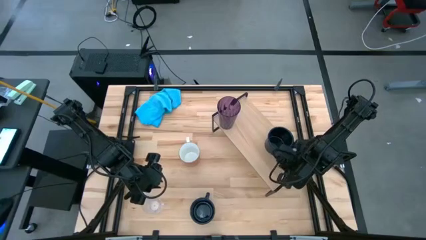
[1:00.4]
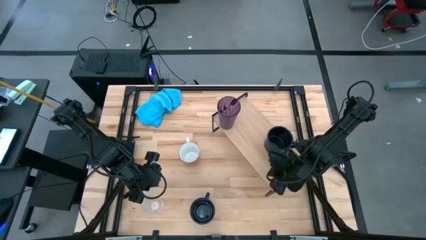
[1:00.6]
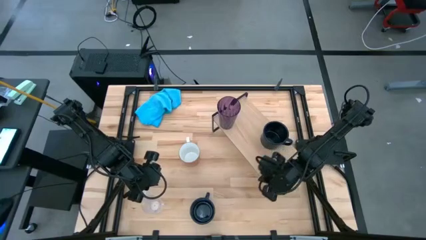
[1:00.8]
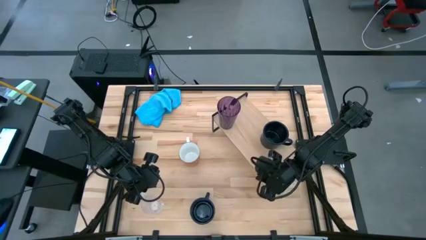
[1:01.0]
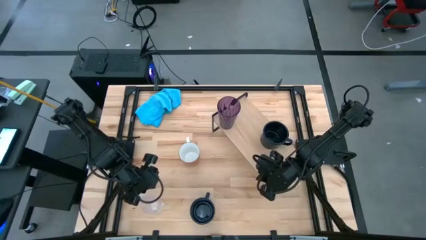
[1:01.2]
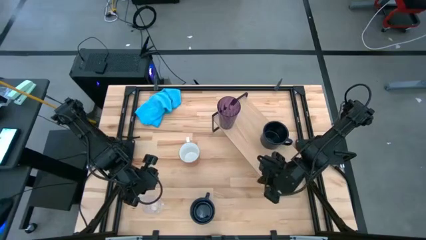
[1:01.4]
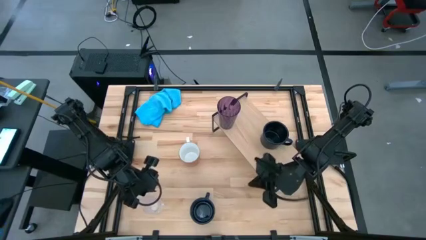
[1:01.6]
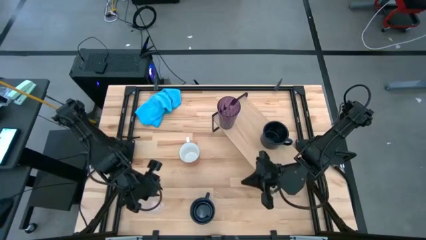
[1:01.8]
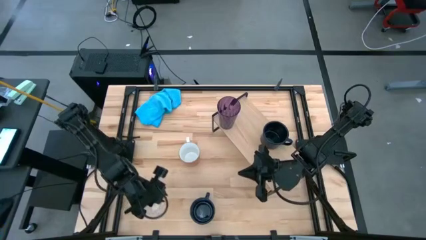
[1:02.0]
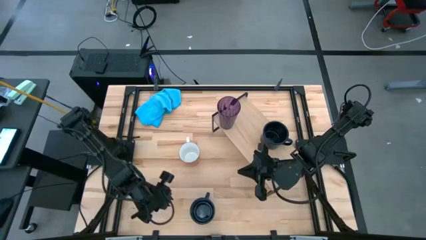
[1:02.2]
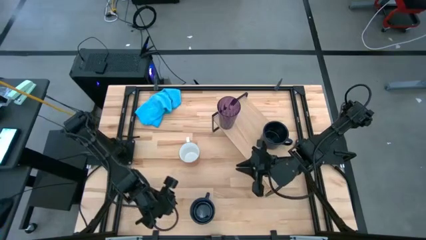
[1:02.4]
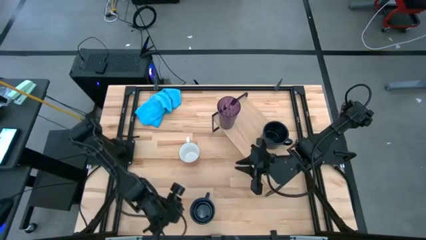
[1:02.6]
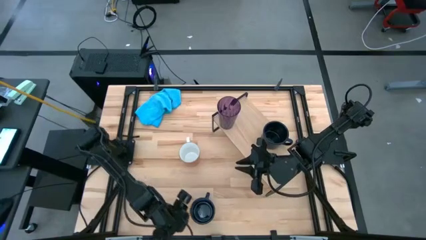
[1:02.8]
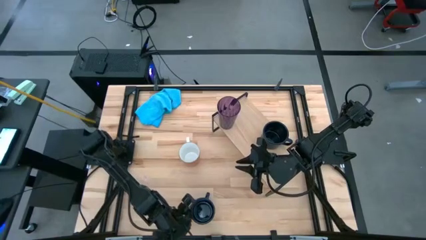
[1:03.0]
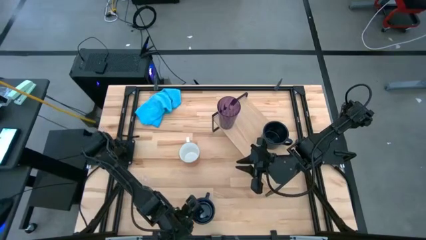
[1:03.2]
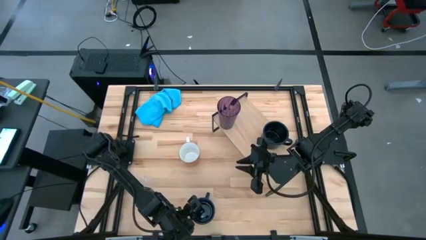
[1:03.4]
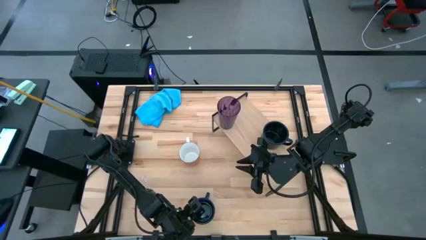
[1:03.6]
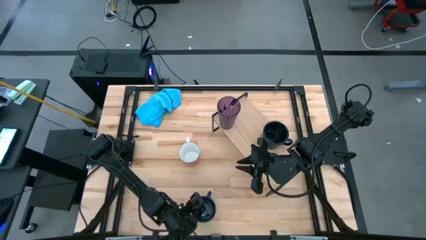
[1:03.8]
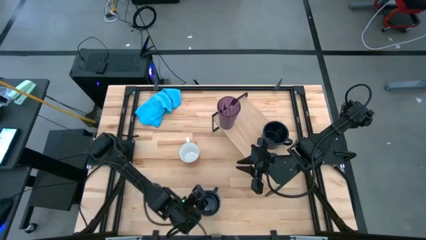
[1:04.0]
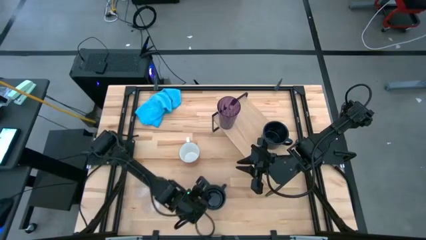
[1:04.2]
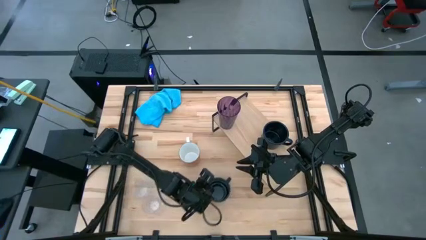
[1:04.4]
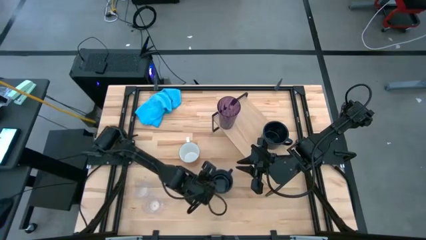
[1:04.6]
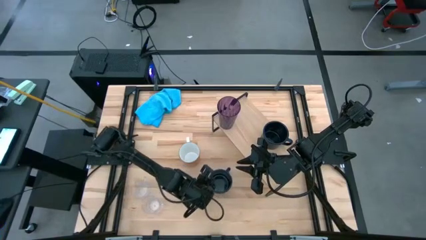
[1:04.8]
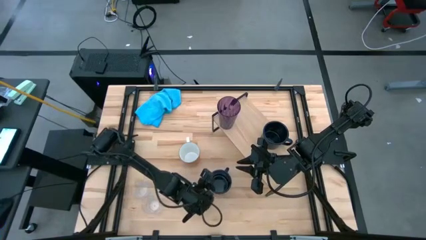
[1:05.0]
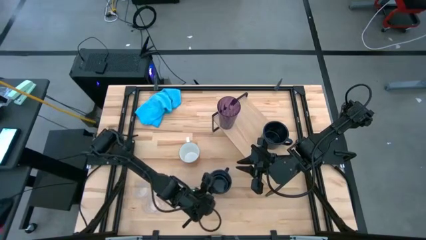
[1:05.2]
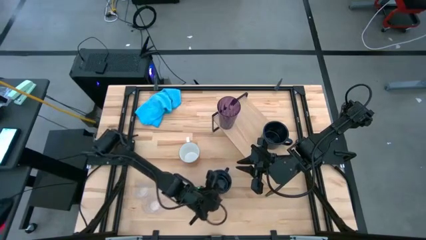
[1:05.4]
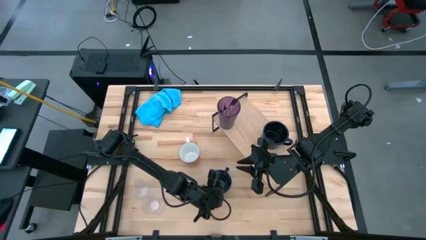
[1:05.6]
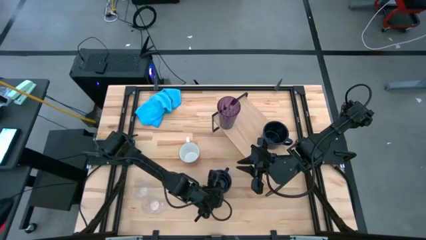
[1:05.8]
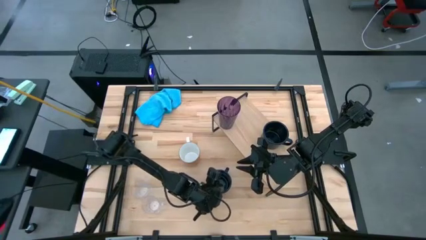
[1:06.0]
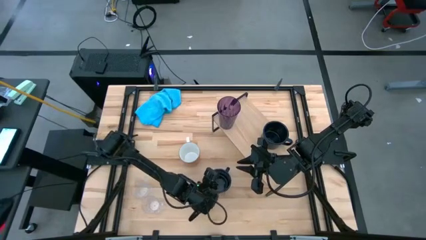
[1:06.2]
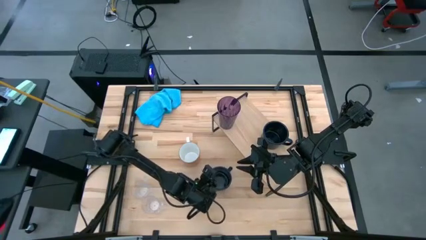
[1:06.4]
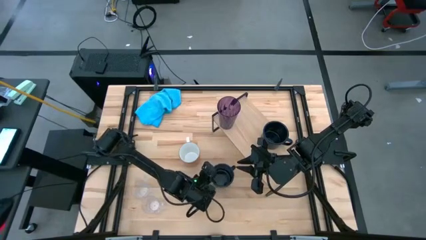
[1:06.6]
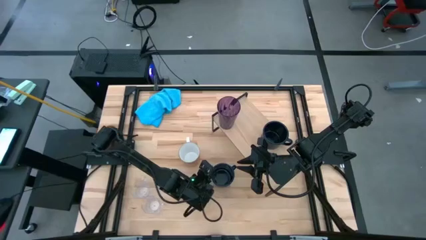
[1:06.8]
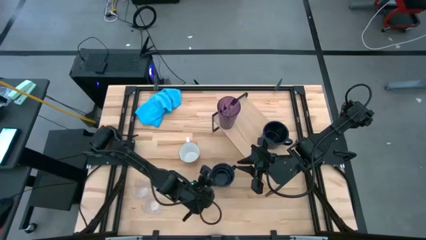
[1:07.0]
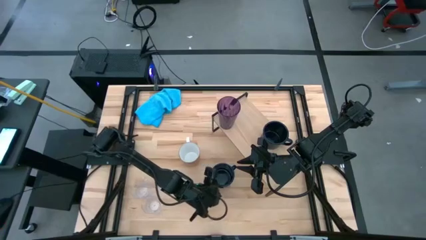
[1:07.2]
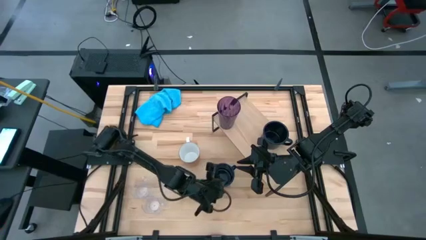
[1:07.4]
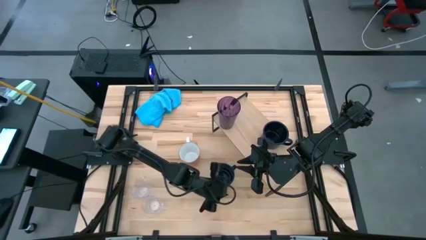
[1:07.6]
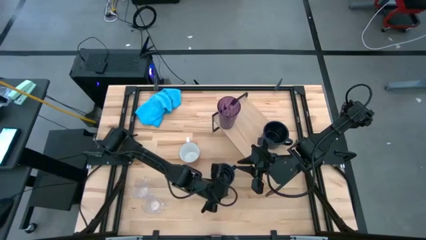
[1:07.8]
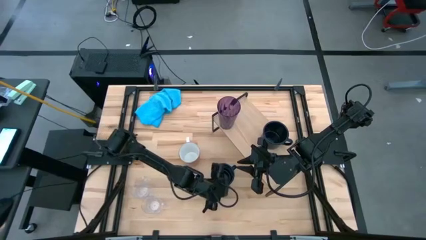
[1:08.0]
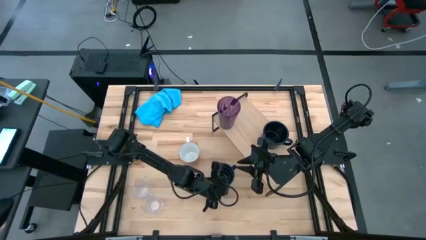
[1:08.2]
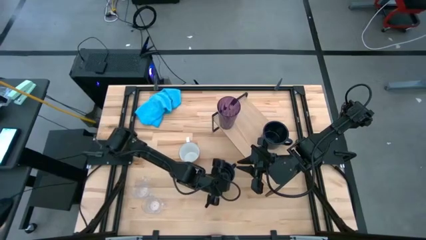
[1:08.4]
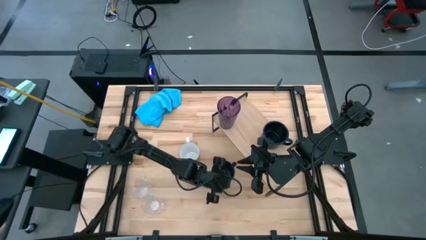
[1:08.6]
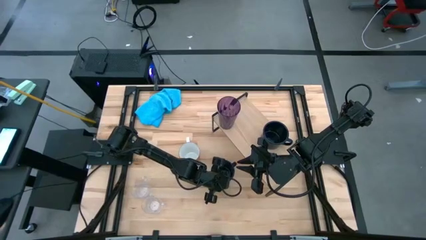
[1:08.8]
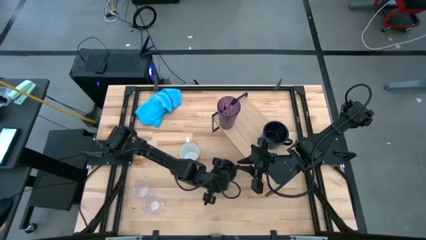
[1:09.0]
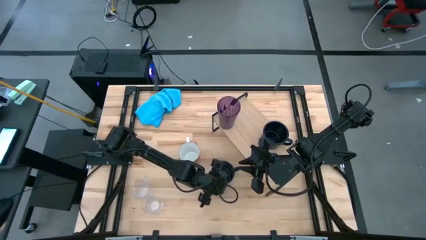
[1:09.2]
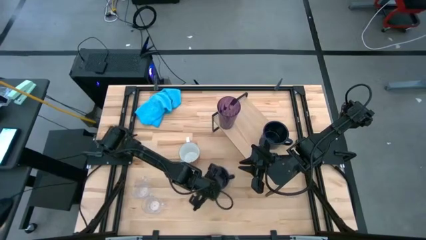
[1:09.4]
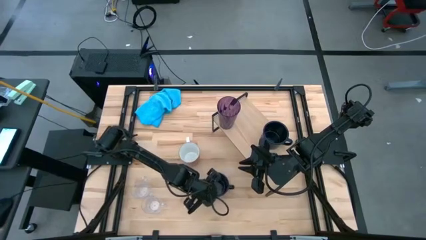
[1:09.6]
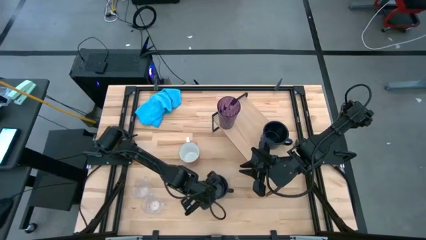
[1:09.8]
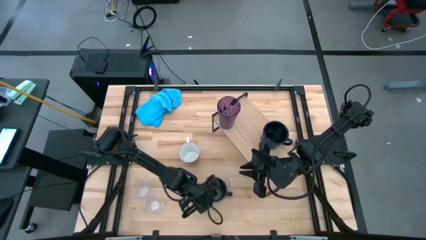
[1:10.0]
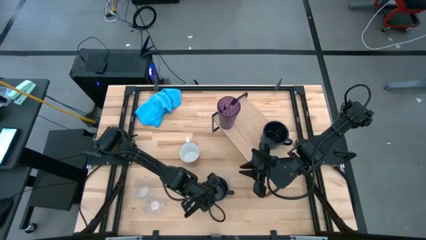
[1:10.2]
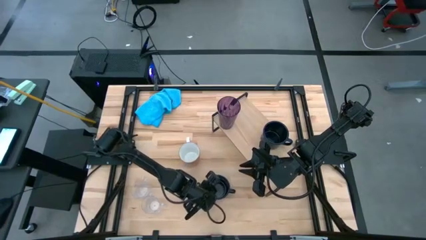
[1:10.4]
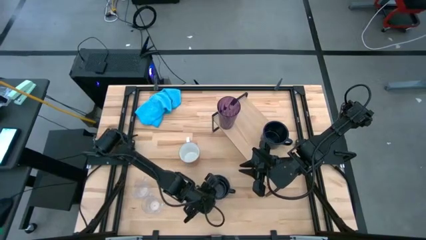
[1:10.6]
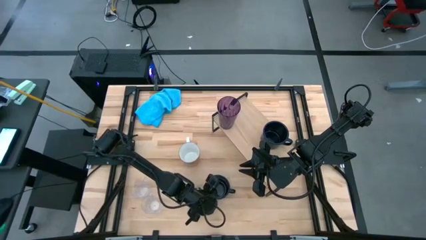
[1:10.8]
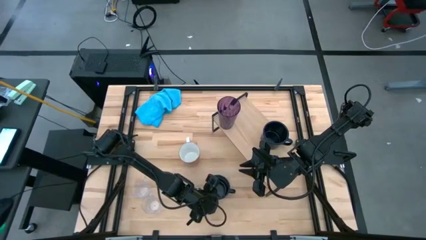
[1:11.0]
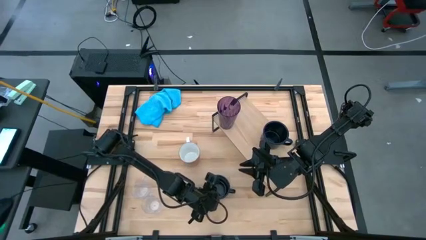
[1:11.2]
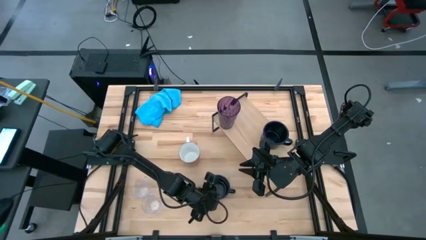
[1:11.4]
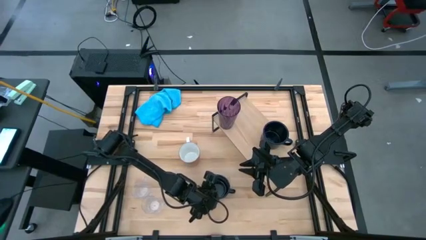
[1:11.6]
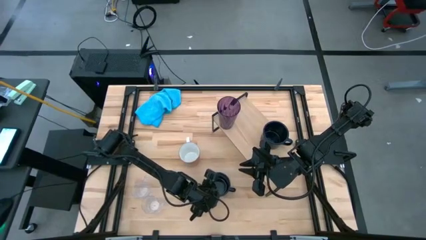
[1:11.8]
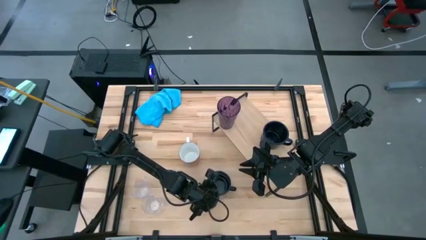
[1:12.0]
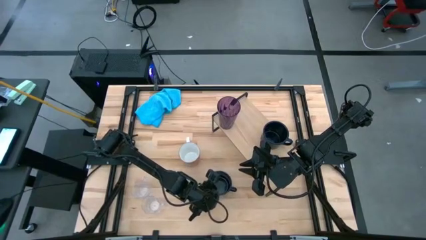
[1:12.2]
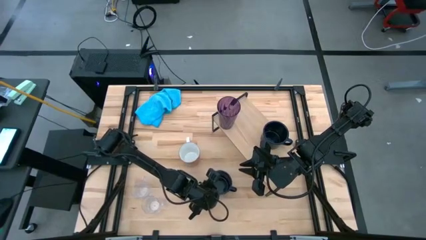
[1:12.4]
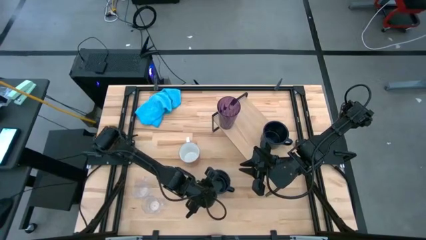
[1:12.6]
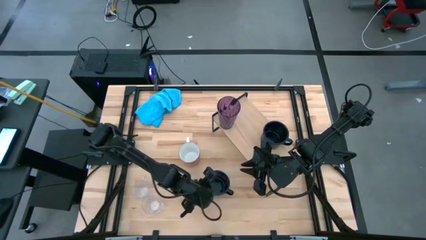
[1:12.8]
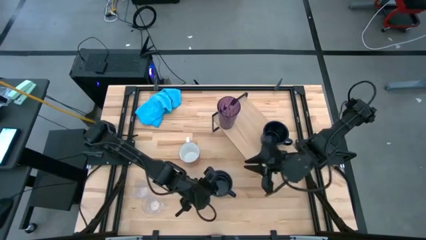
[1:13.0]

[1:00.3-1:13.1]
Task: Stack small to large cups/mugs on shelf
Put the black mug on the shelf aligned with the other black mug

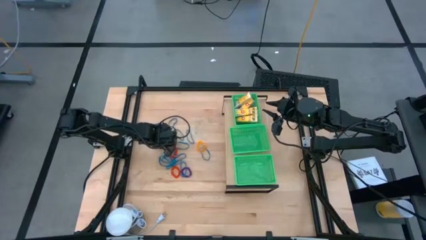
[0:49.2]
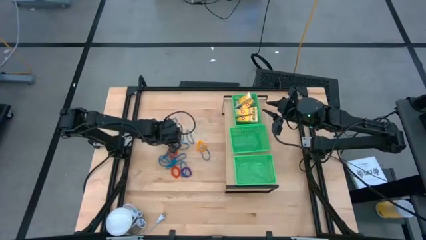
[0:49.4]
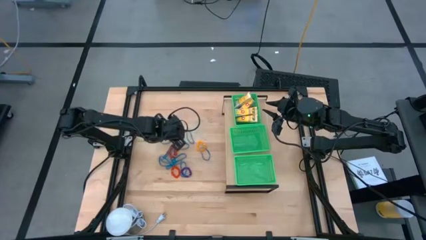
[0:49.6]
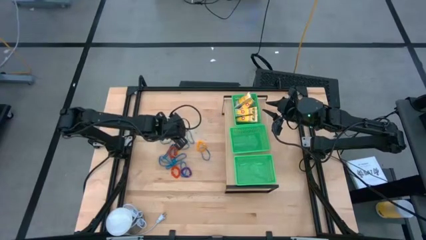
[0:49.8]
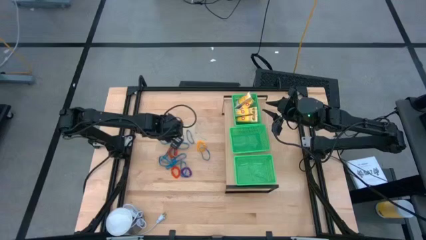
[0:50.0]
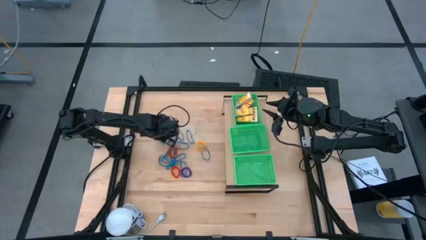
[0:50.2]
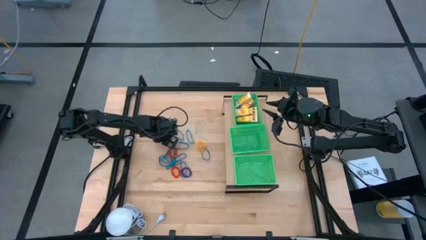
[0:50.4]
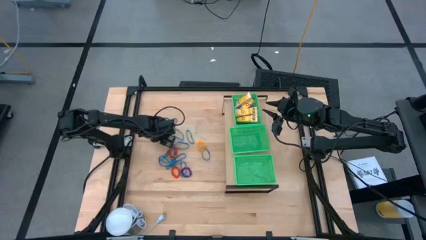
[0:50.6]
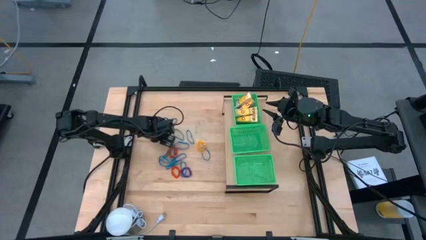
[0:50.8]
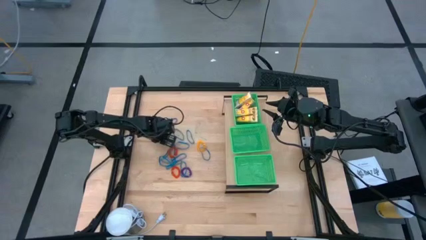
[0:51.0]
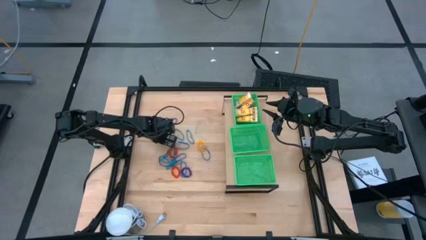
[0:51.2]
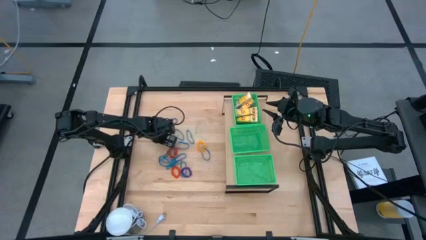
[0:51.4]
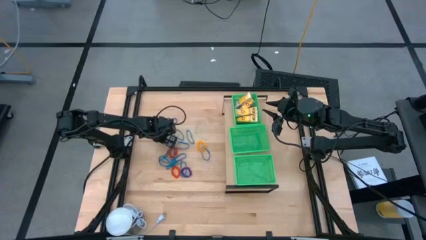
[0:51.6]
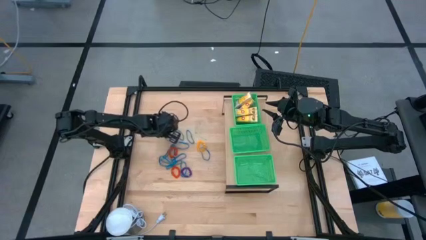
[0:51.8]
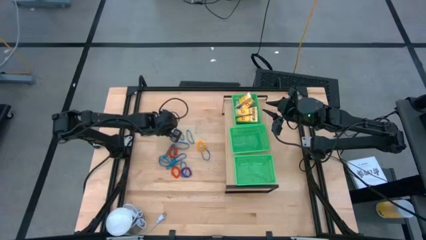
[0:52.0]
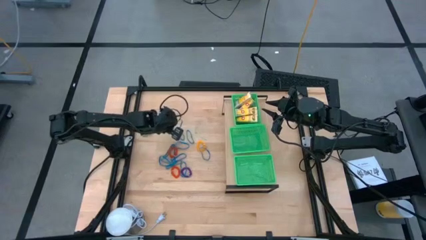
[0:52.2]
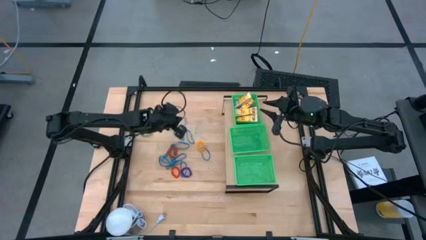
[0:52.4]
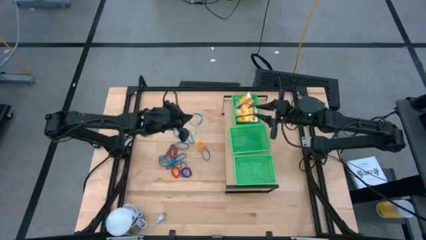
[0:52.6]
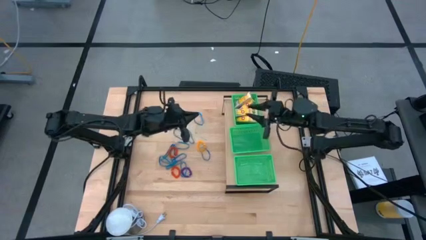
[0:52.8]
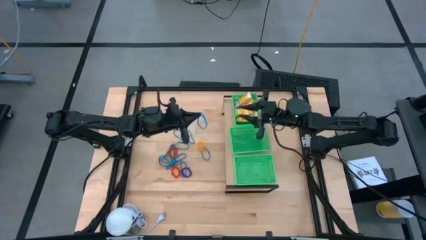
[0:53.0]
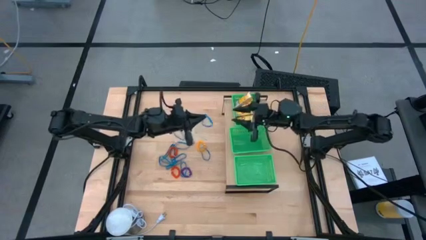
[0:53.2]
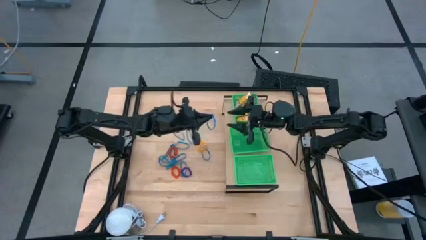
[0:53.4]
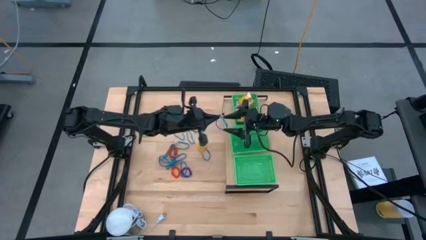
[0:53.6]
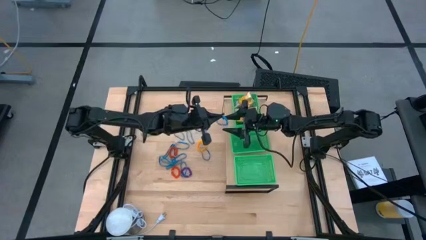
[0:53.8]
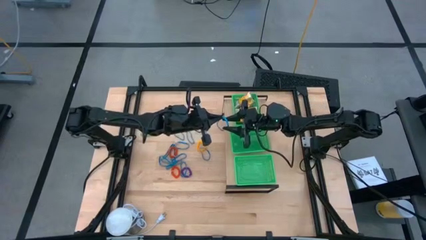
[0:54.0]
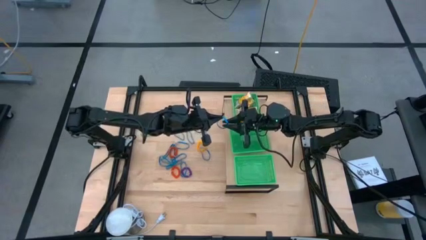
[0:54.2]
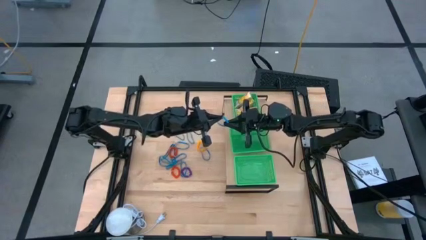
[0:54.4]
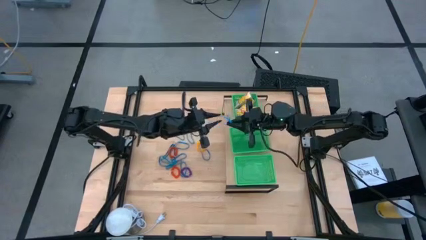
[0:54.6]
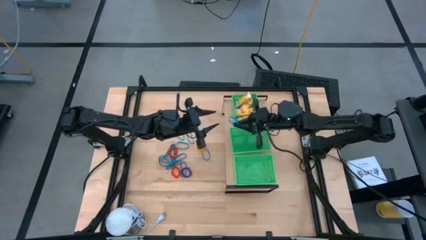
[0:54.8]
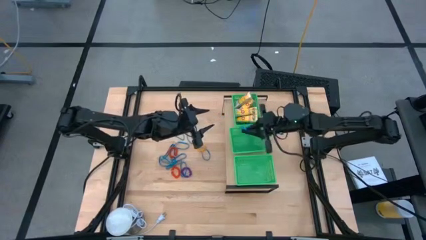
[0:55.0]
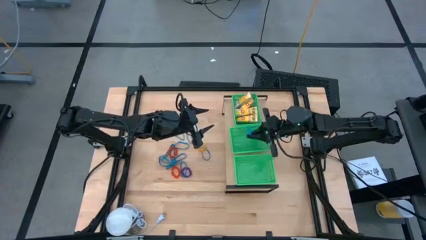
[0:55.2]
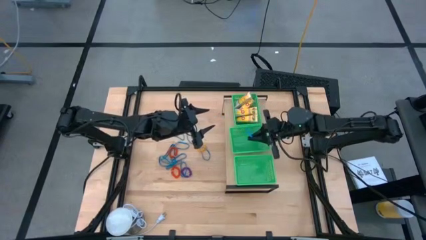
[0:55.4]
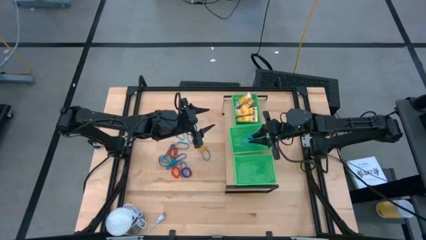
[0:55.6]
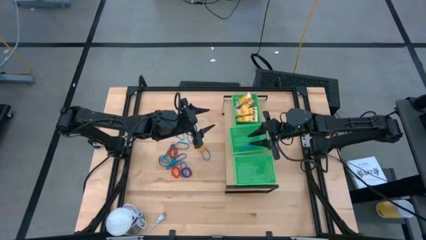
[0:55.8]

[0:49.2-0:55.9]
Task: Pick & Place Office Desk Supplies
Put the blue rubber band into the middle green bin
